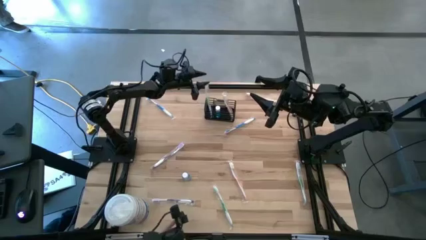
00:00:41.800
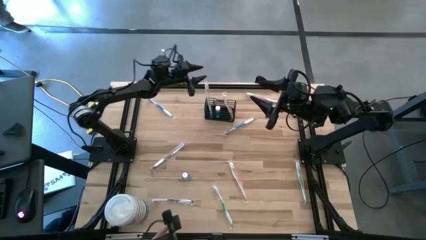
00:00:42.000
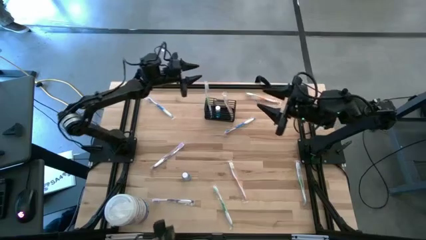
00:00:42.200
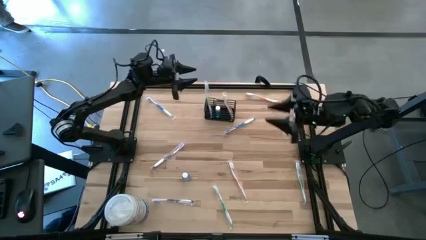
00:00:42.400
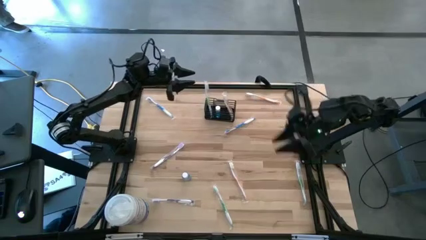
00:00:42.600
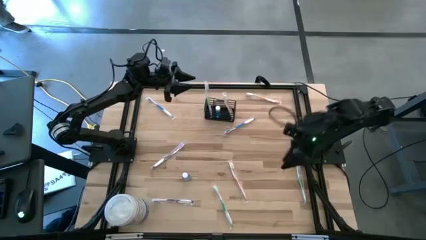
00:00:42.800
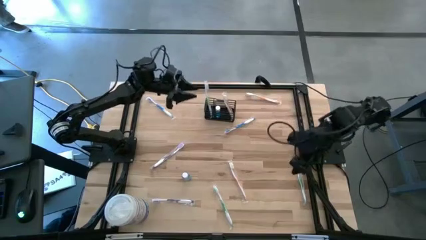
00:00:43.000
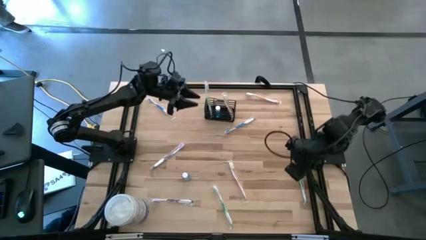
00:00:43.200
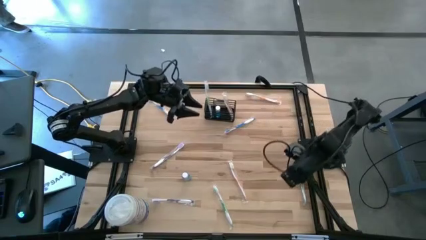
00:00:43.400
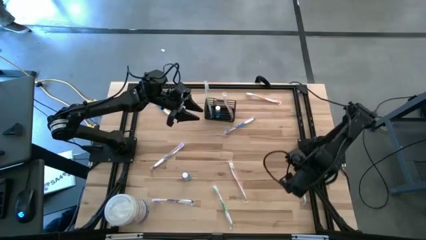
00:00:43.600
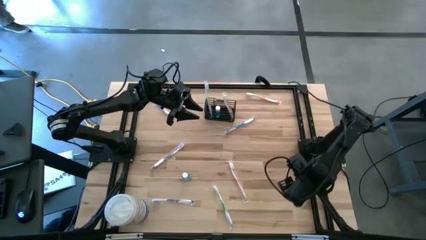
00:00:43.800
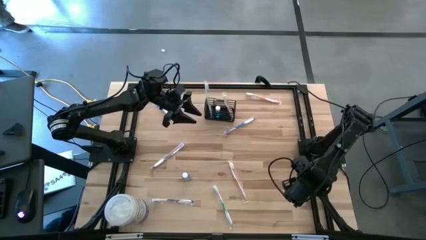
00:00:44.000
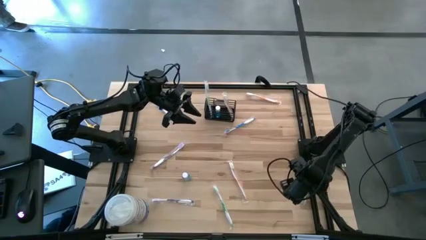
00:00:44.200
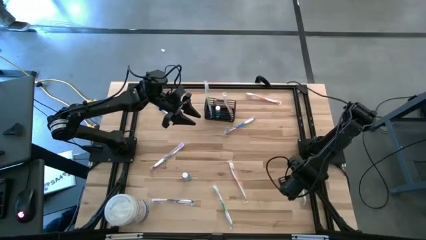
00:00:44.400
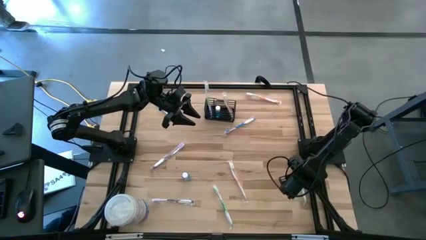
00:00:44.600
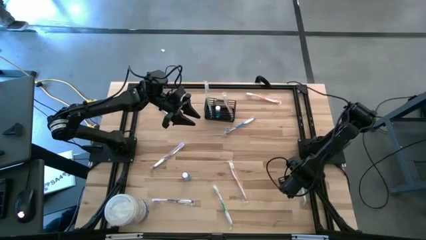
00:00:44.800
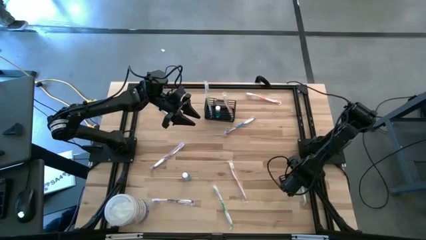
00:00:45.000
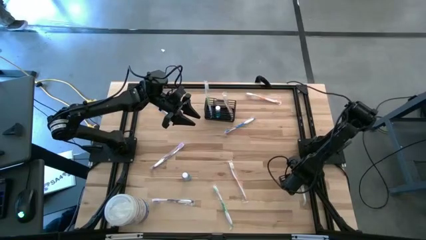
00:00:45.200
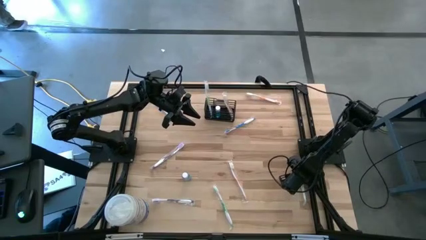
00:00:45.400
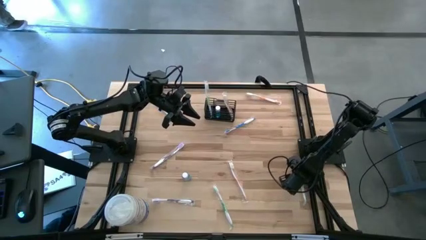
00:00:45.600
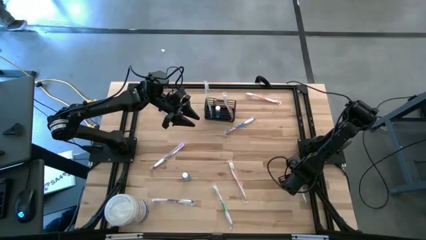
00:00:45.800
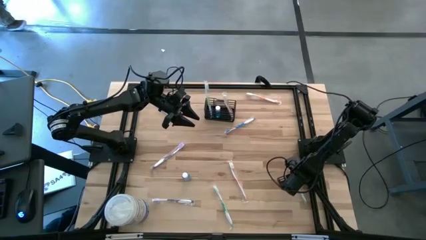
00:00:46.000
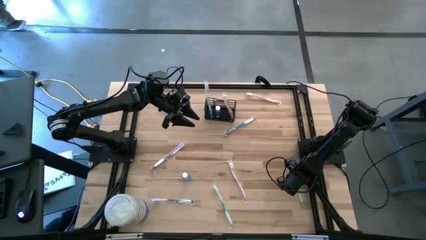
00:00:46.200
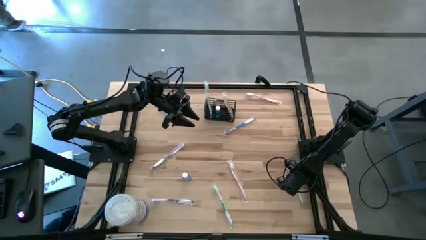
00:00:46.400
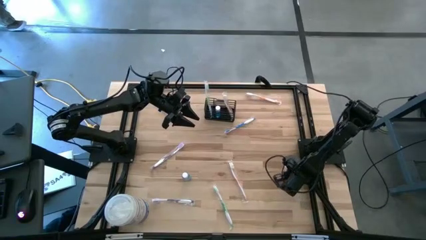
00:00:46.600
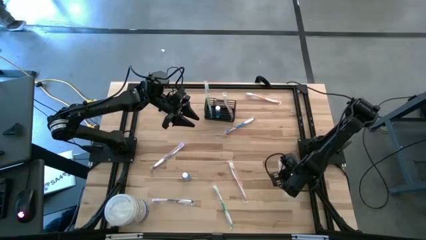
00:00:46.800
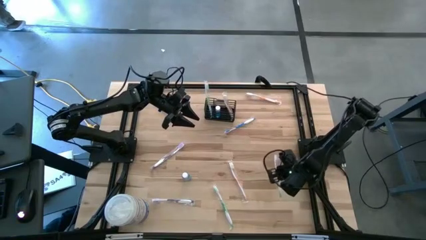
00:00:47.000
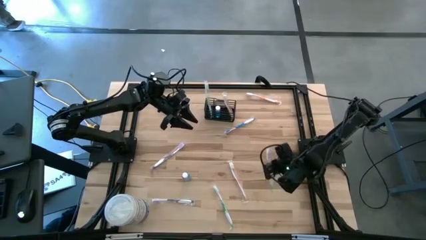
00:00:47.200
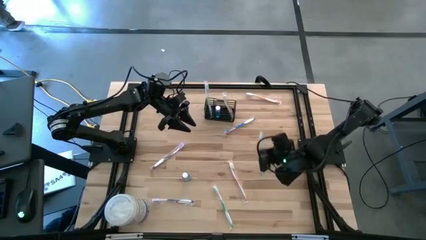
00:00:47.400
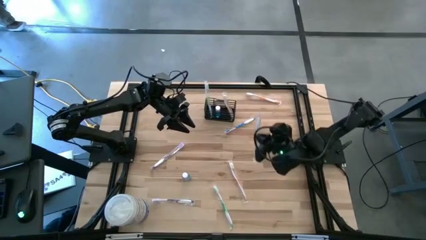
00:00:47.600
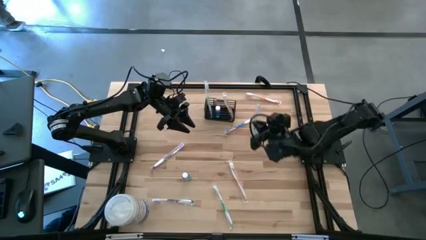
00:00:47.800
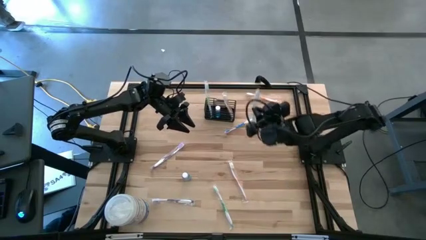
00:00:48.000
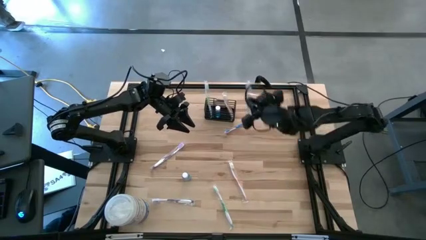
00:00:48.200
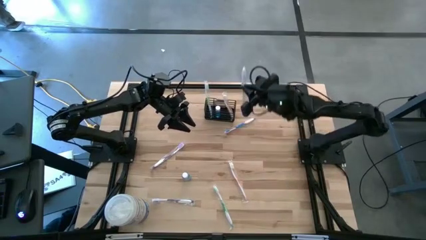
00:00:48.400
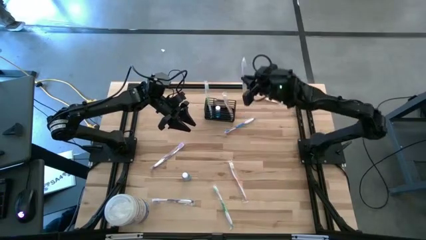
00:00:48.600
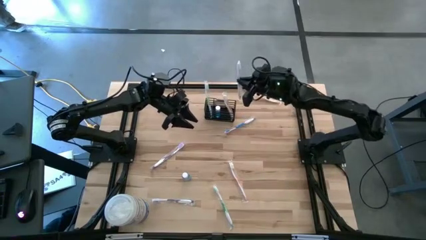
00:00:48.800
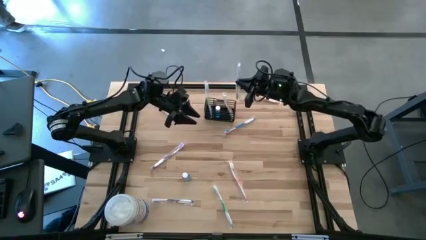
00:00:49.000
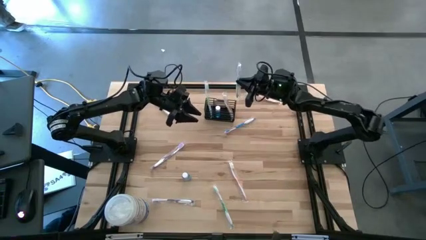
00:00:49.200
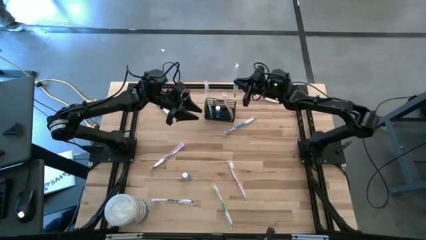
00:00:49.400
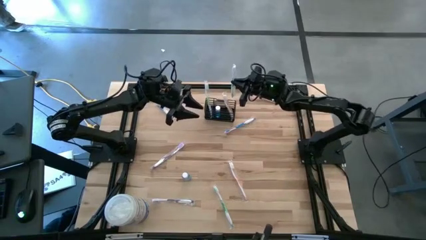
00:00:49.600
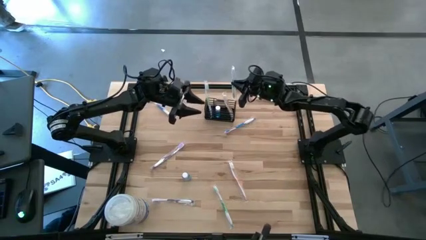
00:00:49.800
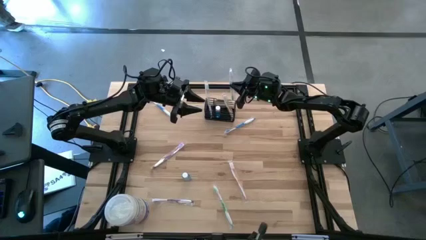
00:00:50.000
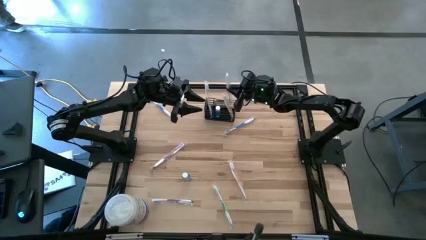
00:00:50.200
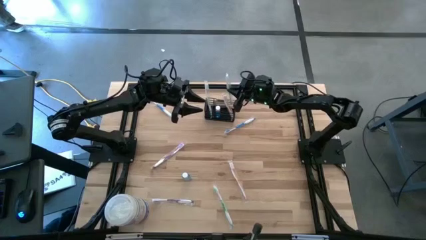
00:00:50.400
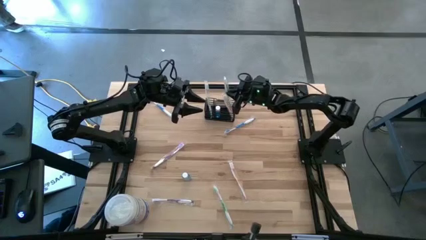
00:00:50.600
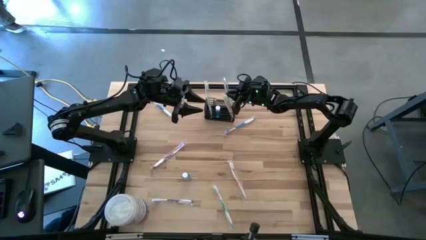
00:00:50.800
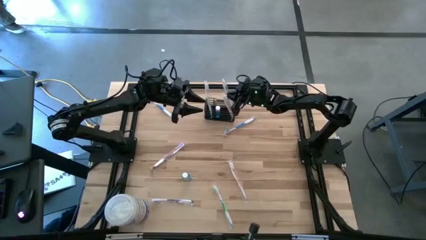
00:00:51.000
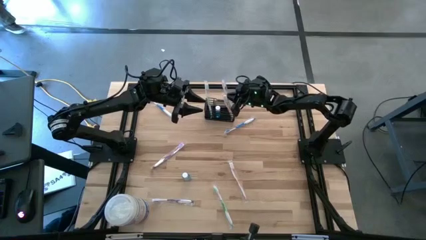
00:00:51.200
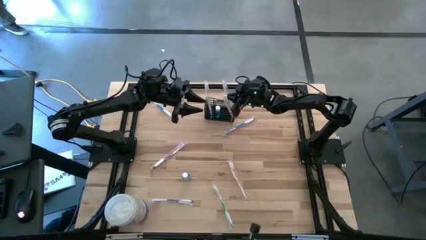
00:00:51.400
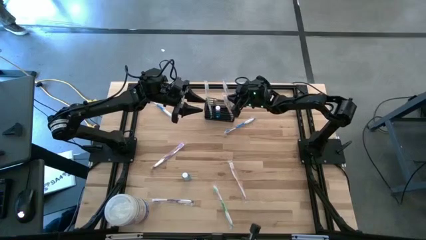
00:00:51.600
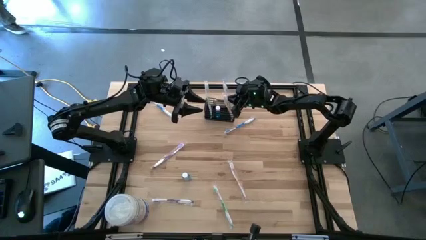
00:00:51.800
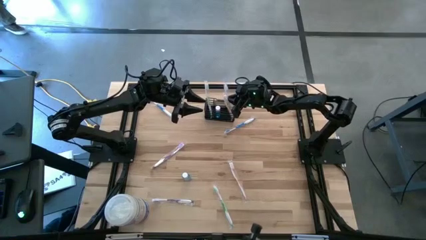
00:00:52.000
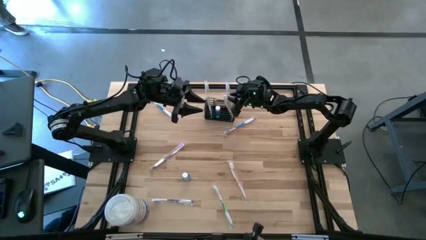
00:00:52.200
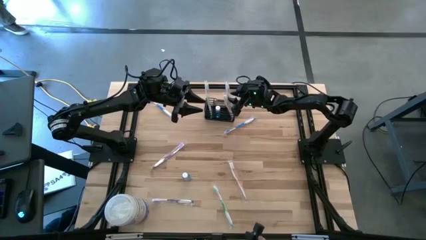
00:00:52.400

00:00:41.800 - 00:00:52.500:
Task: Pick & Place toothbrushing station
Put the right green toothbrush on the mesh organizer

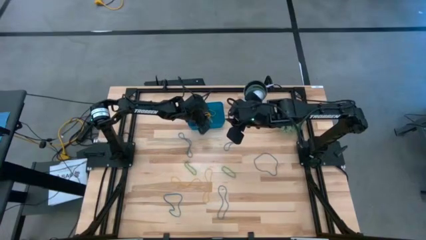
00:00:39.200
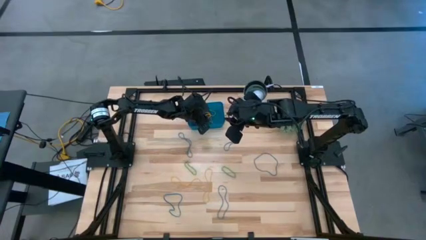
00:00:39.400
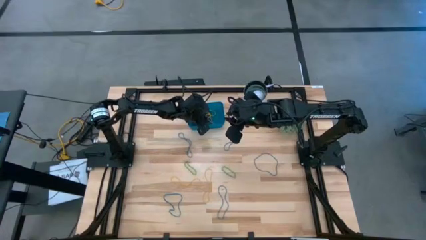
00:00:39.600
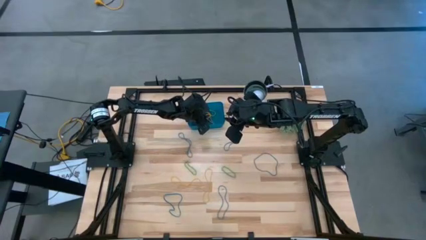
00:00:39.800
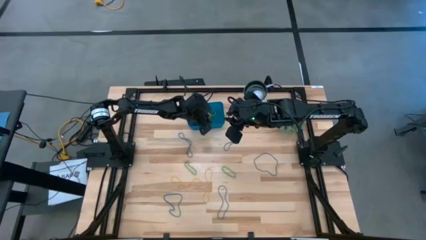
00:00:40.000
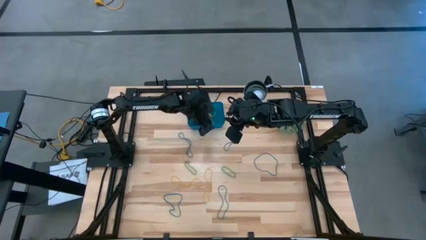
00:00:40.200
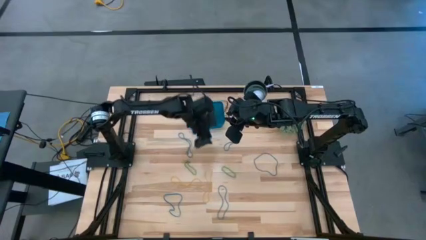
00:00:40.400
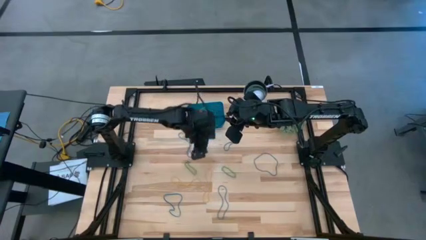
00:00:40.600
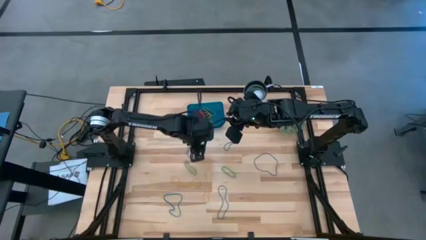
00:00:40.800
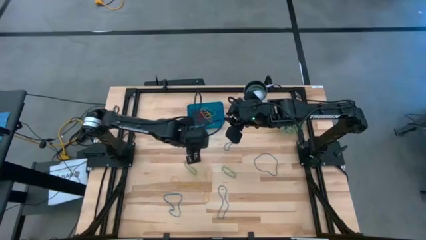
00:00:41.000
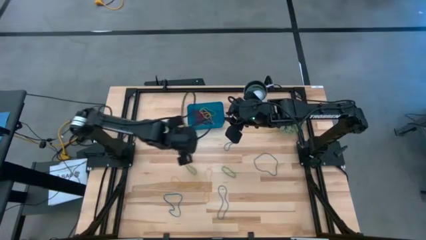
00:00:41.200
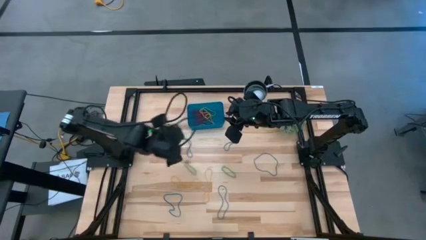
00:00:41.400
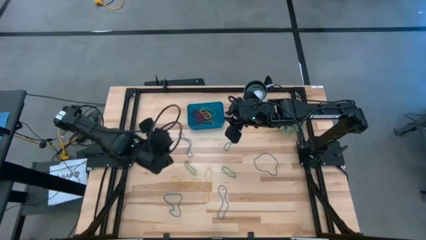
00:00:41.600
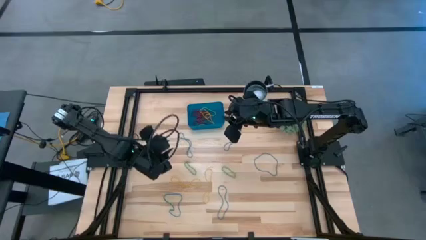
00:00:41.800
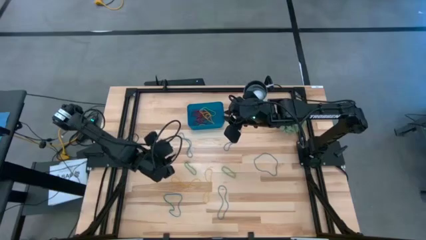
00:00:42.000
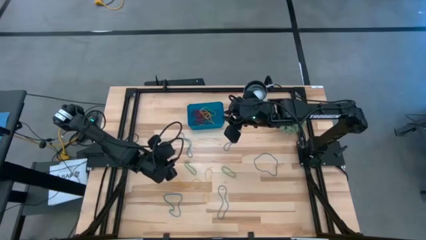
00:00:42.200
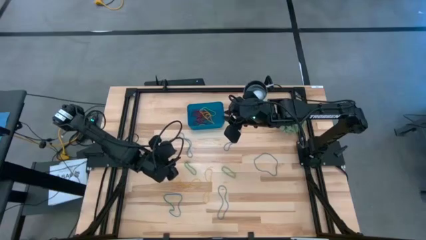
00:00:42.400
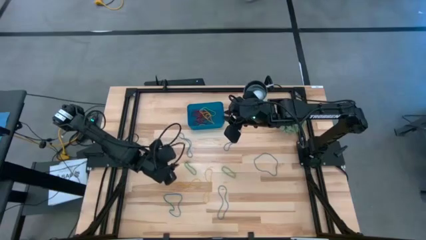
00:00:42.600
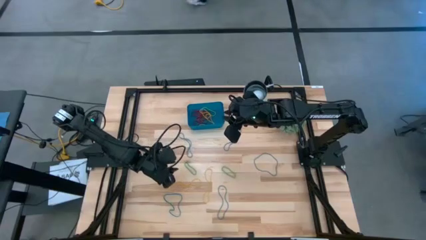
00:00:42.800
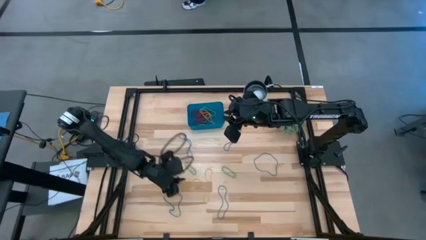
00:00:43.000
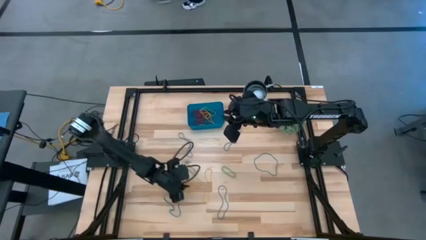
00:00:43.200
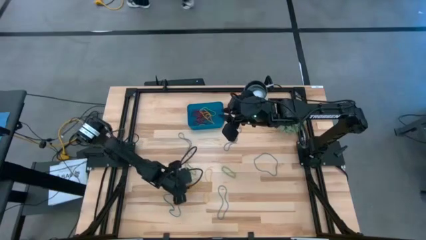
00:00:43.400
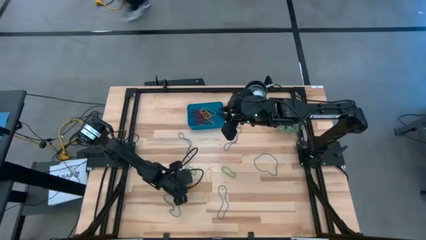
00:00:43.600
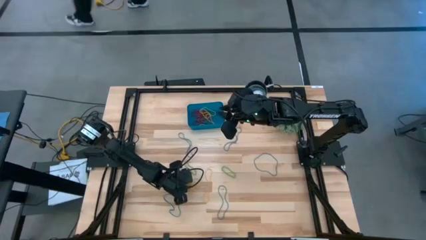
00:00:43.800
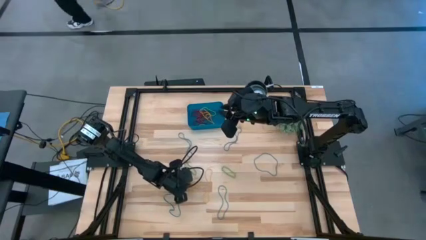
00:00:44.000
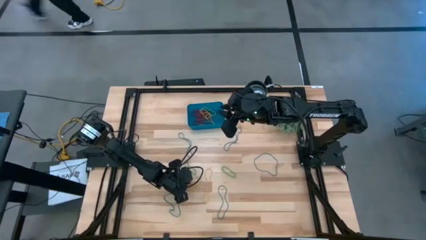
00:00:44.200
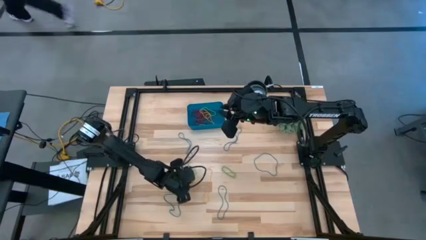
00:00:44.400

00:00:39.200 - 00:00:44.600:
Task: Pick and place items into bin
Put the yellow rubber band into the blue bin
